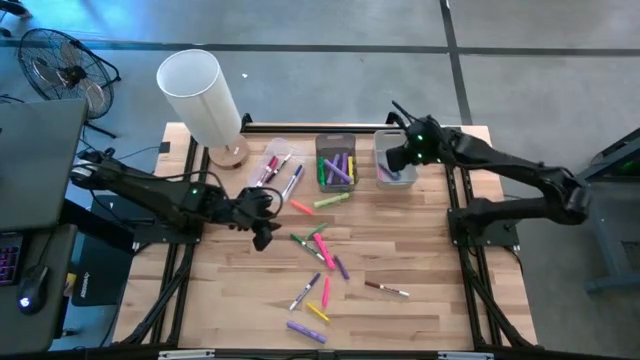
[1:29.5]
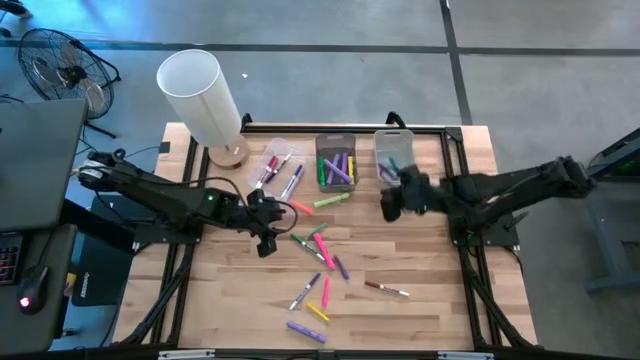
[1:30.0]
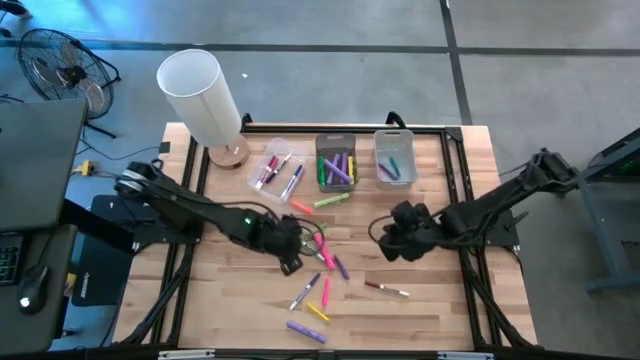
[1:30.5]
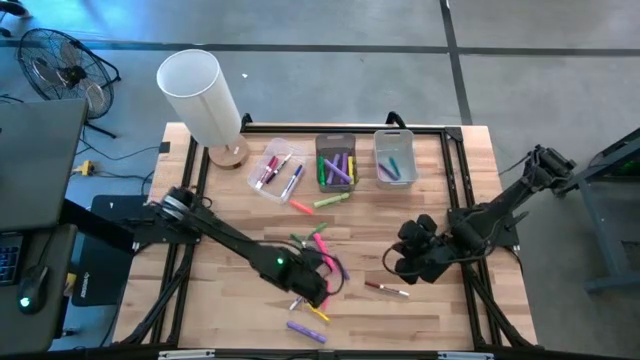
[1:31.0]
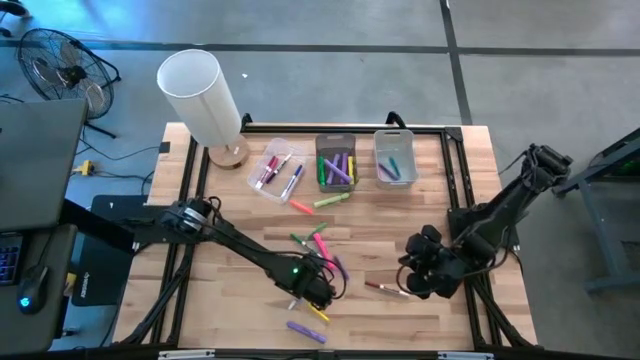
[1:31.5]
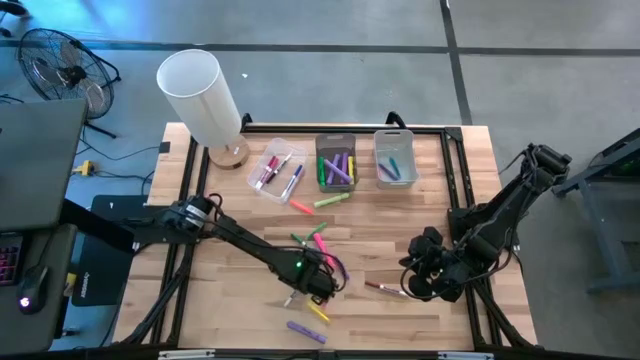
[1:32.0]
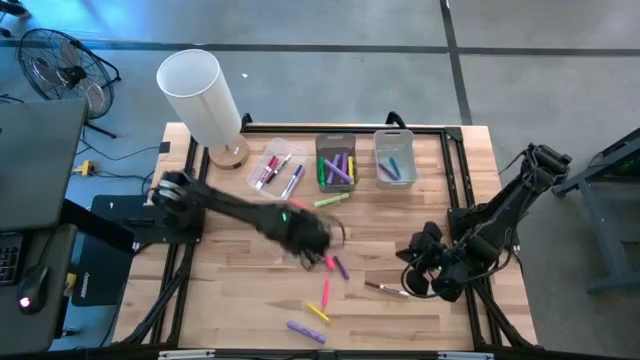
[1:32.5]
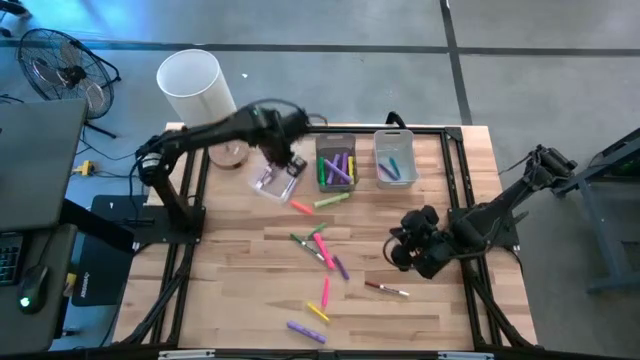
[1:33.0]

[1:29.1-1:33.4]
Task: Pick & Place Markers
Put the dark blue dry erase marker into the transparent bin

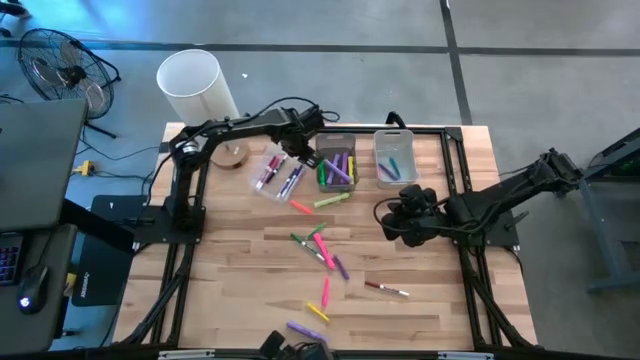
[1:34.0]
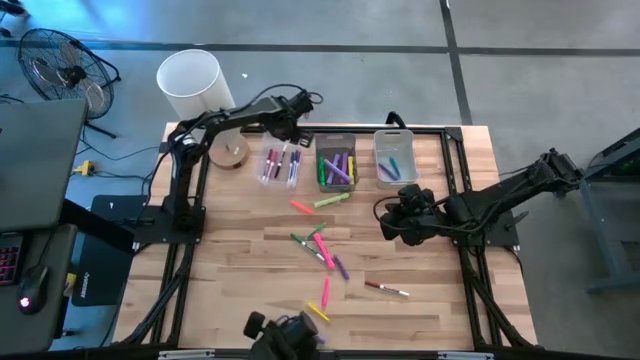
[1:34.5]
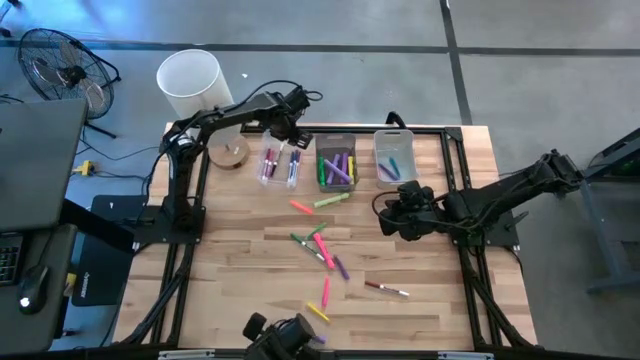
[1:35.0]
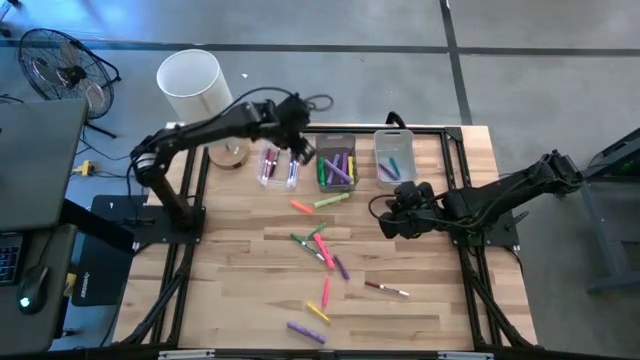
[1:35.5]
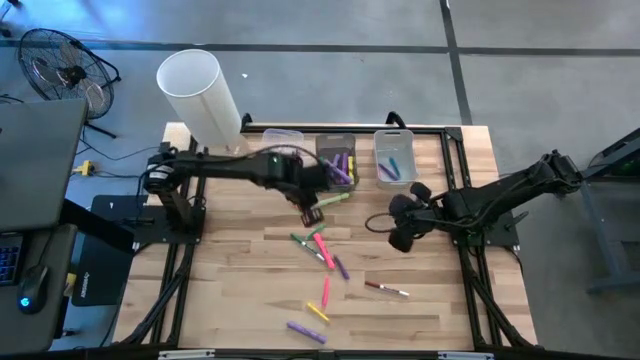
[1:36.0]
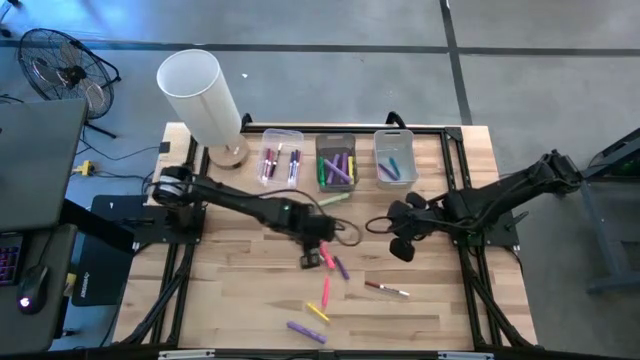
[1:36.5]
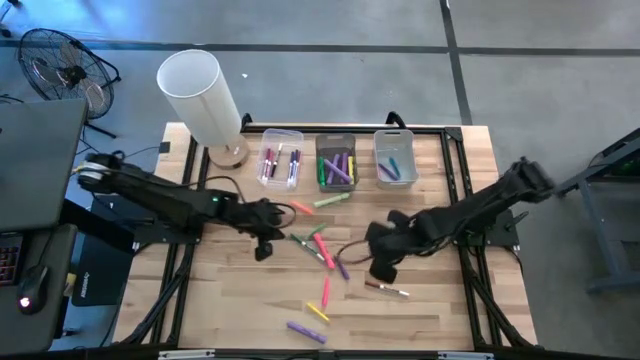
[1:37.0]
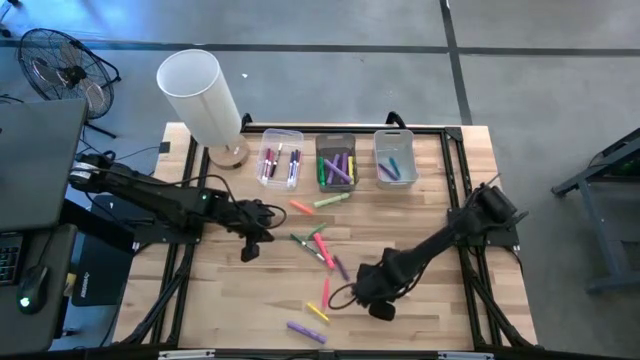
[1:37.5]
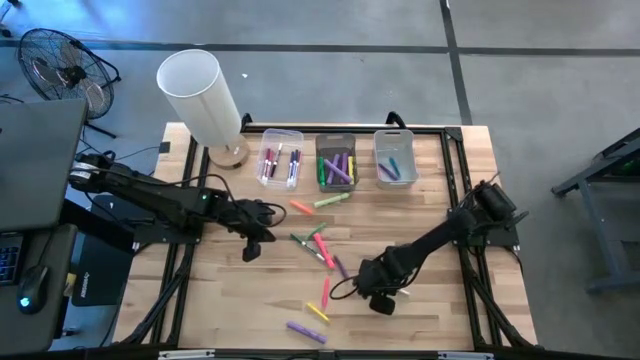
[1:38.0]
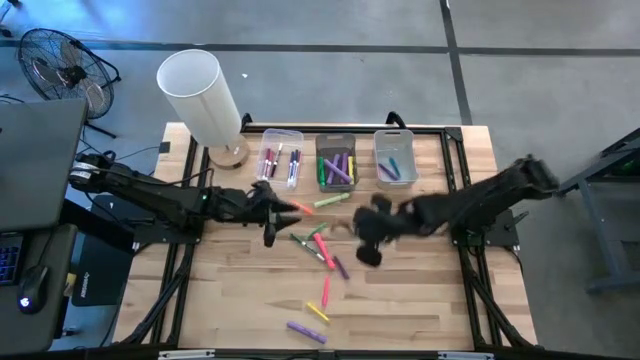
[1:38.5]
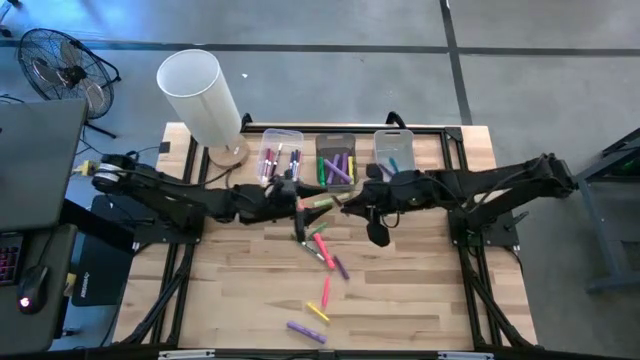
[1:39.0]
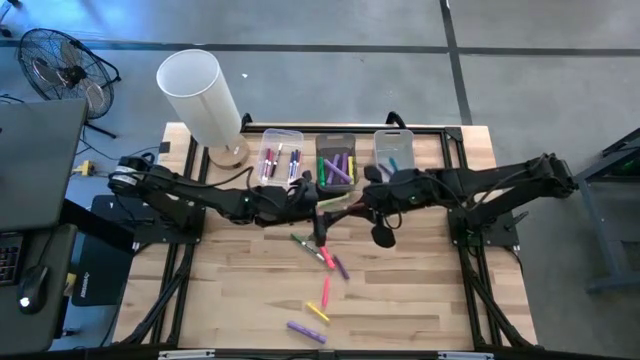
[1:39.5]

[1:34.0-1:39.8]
Put the brown dry erase marker into the transparent bin

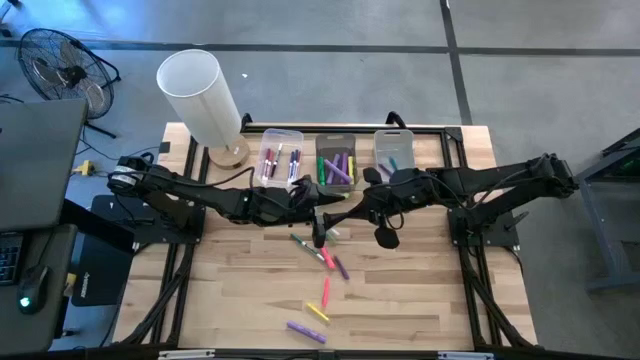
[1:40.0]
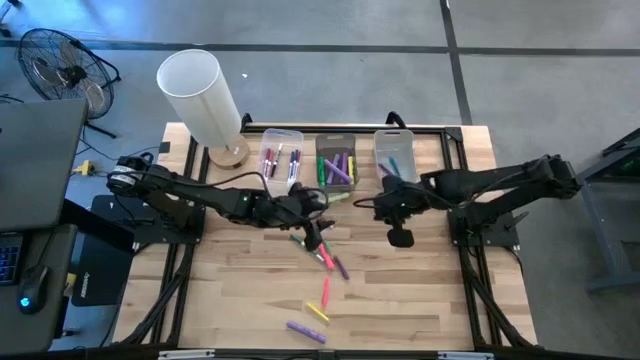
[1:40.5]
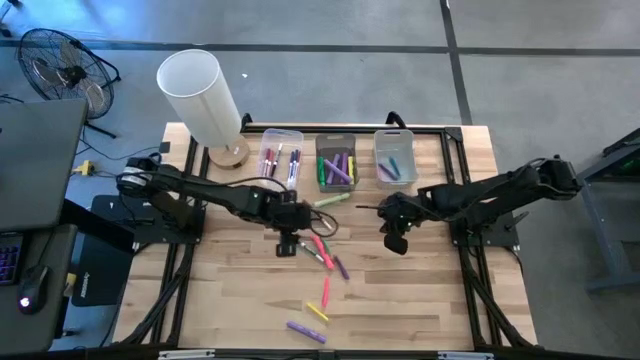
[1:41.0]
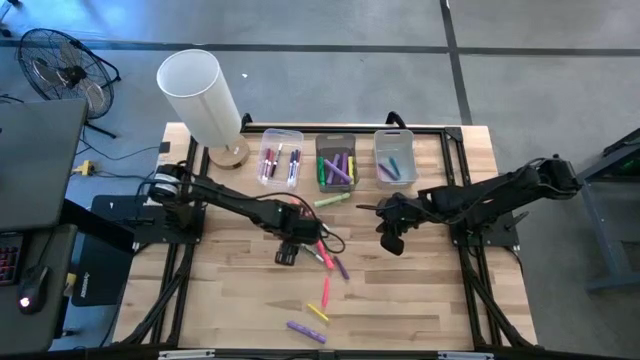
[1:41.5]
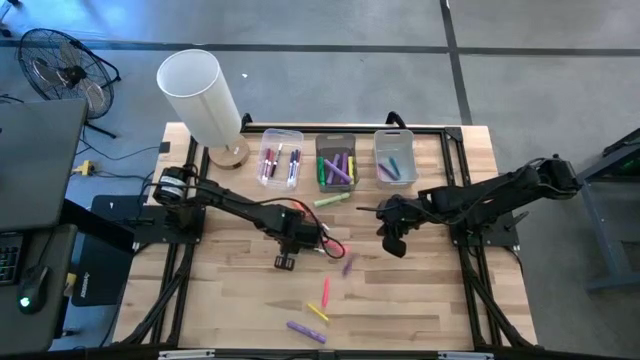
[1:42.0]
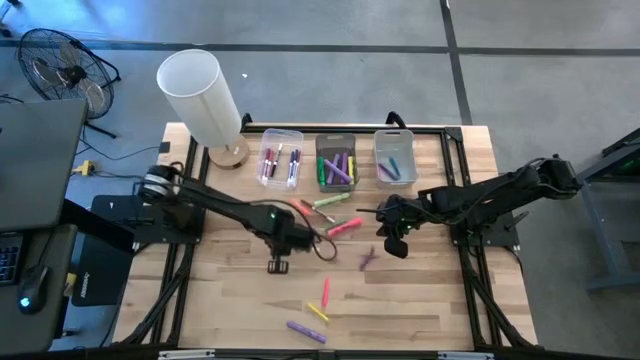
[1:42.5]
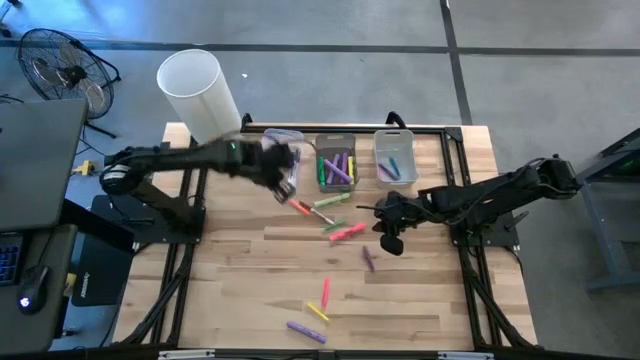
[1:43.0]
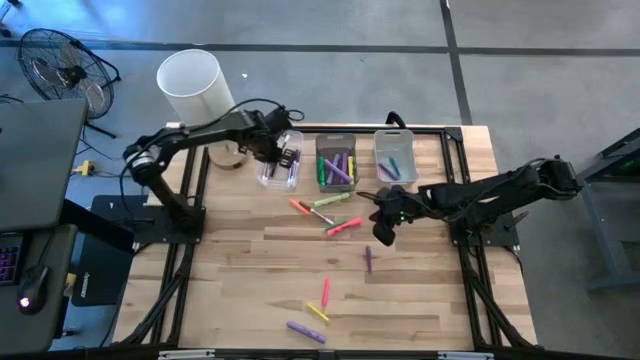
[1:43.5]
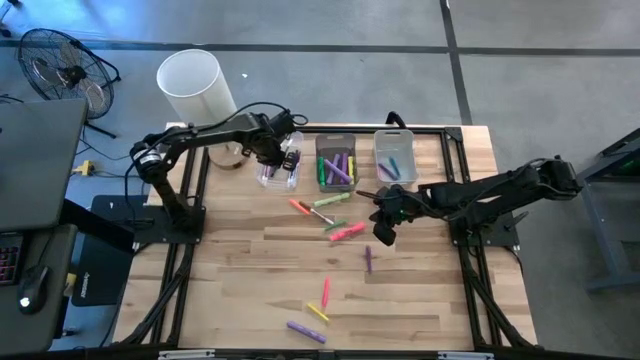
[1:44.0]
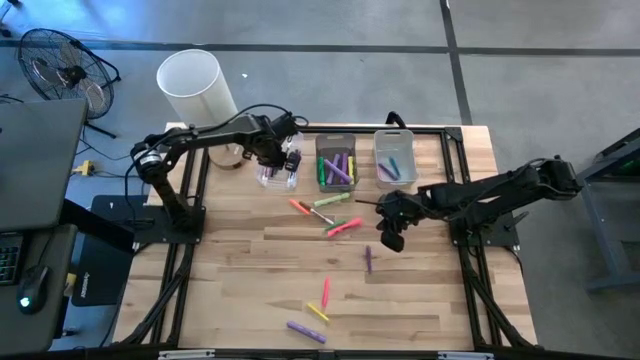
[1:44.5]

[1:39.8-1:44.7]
Put the green dry erase marker into the transparent bin

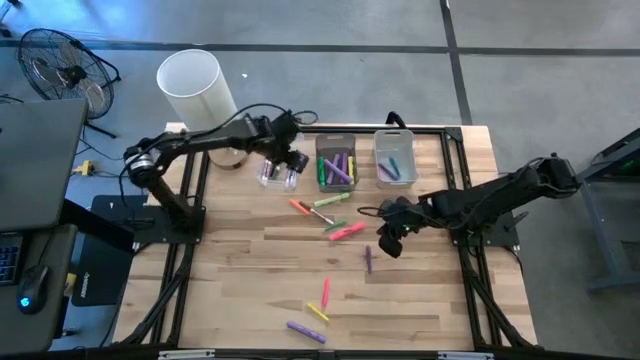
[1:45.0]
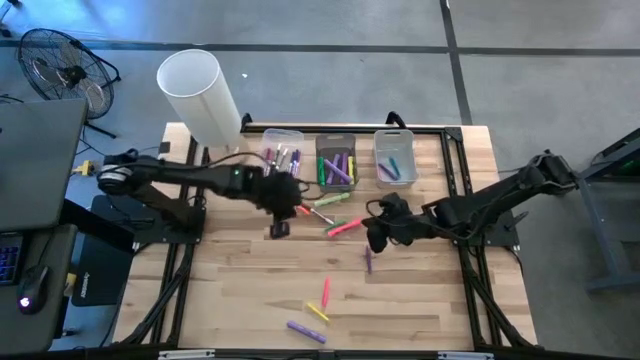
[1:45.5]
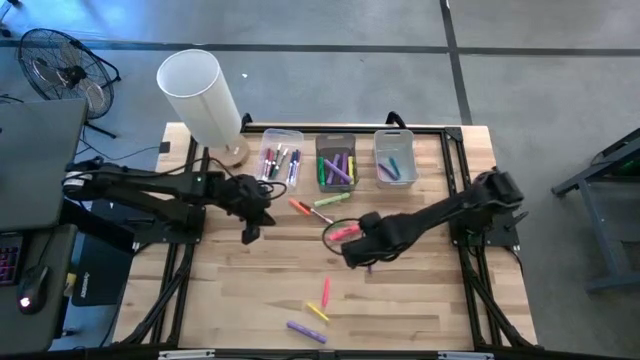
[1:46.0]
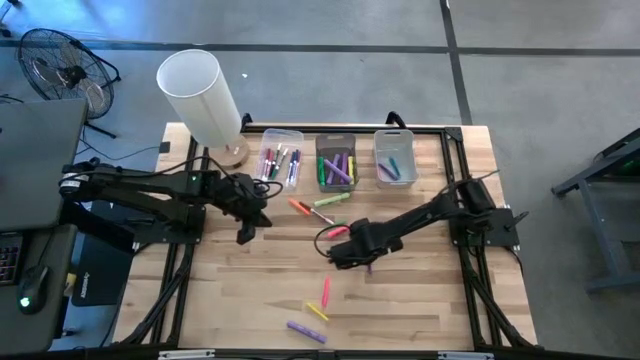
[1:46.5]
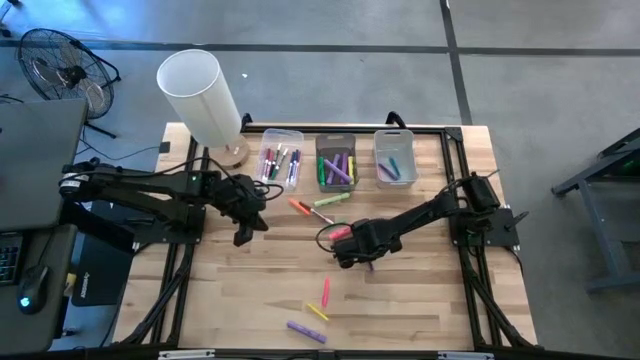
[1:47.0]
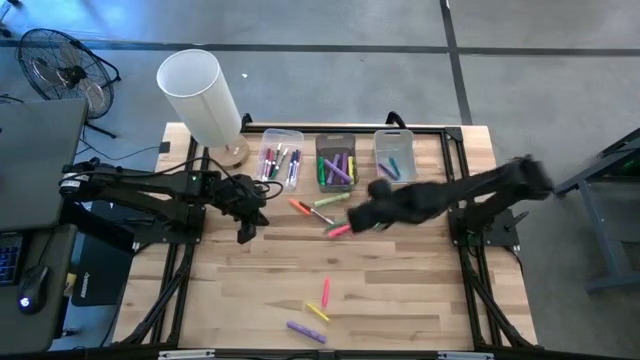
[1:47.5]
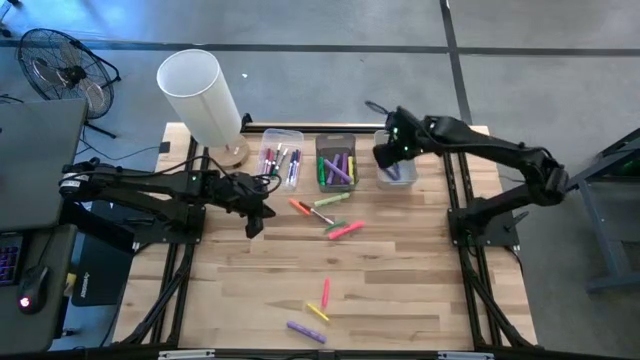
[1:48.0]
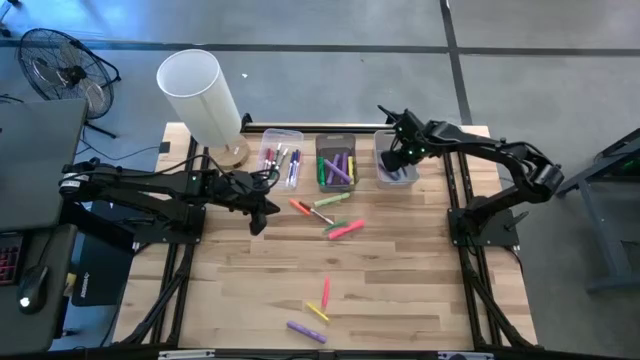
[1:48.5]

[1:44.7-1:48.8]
Put the purple pen into the gray bin

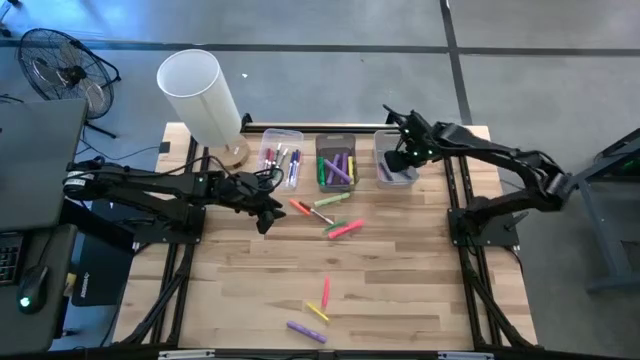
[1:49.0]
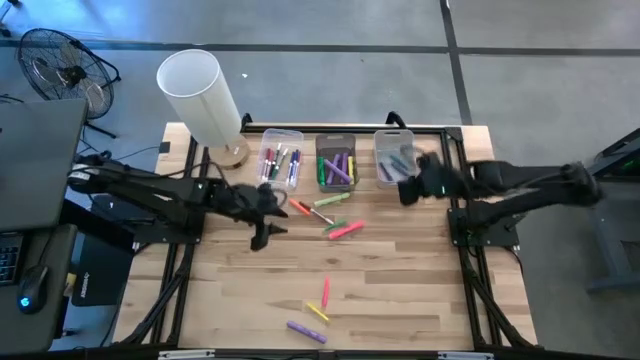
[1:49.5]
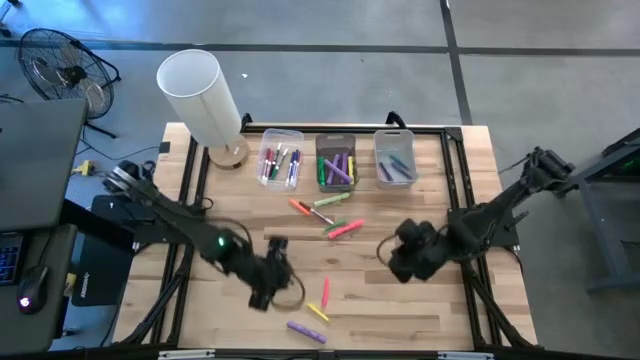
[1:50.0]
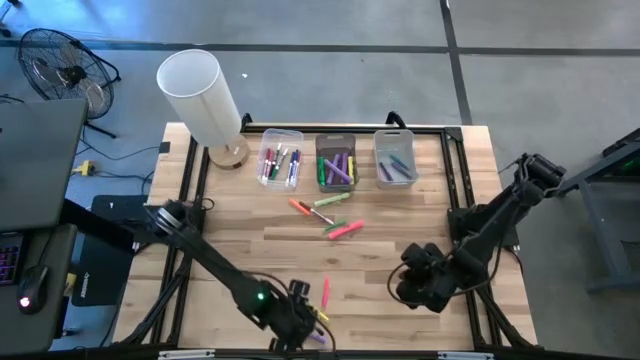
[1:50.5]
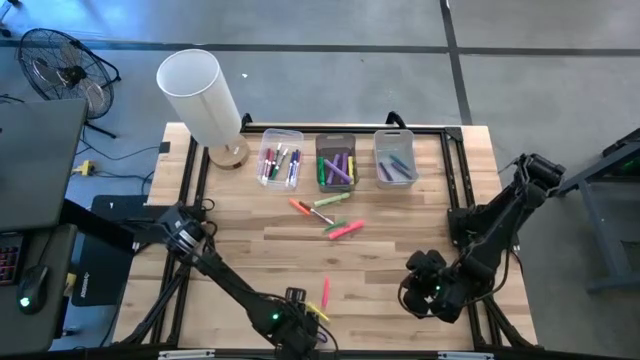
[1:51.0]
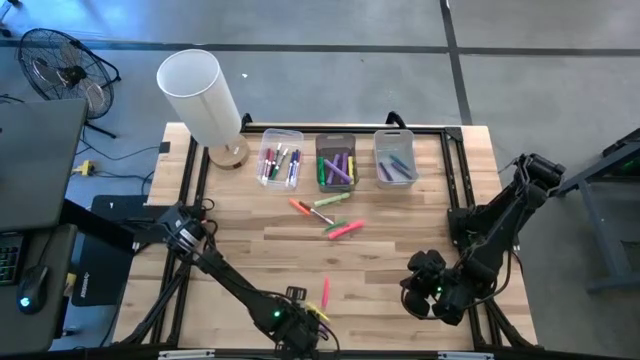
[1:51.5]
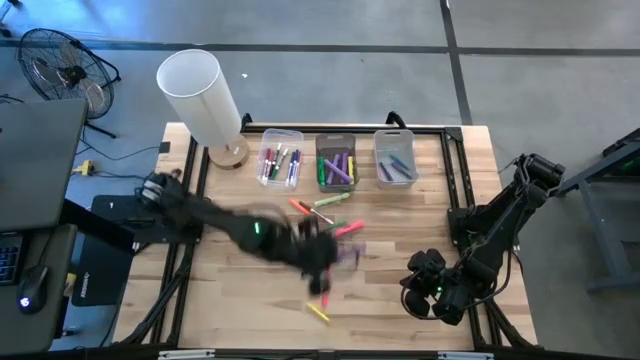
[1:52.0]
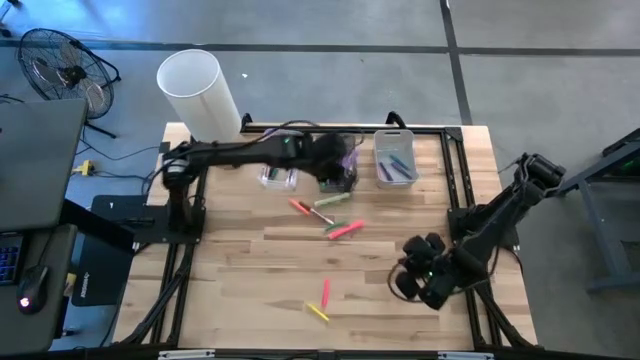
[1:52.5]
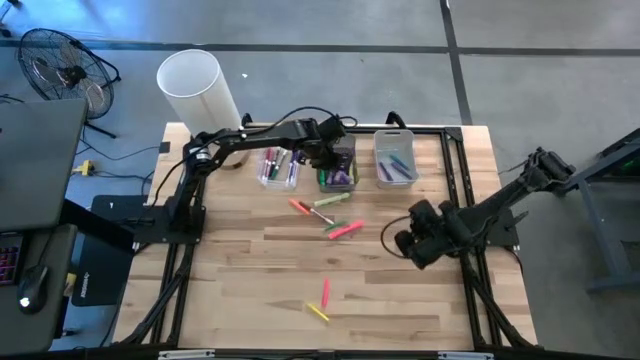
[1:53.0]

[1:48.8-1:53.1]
Put the violet highlighter into the black bin
